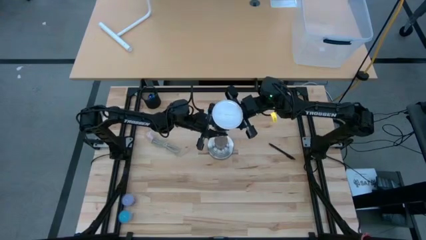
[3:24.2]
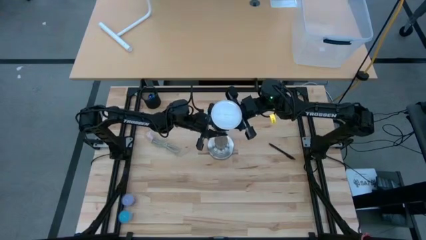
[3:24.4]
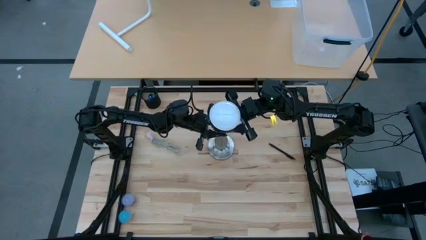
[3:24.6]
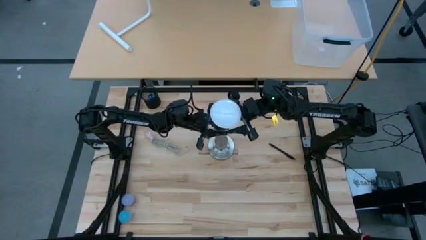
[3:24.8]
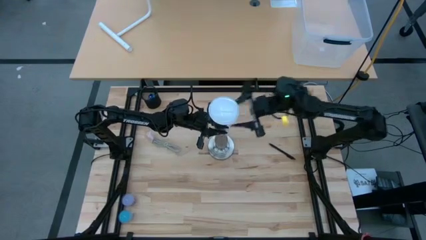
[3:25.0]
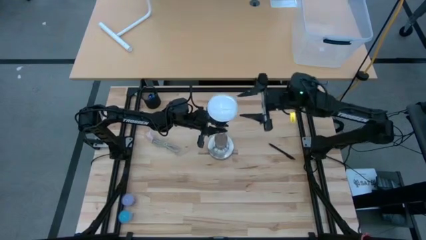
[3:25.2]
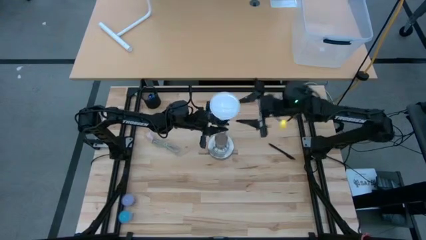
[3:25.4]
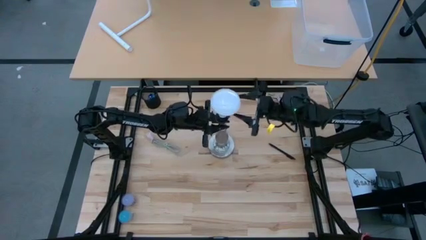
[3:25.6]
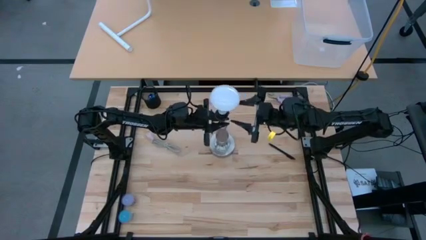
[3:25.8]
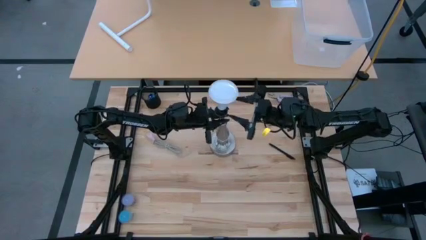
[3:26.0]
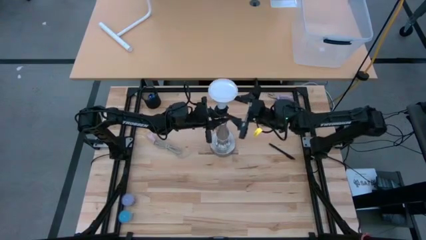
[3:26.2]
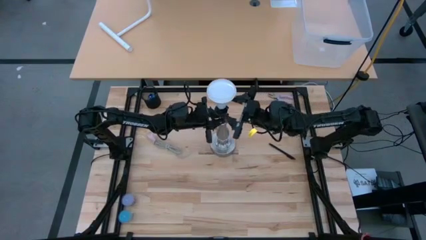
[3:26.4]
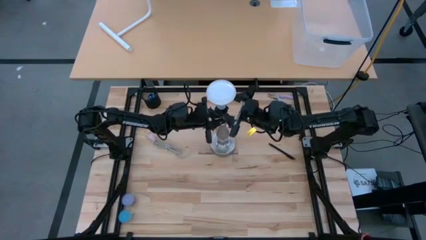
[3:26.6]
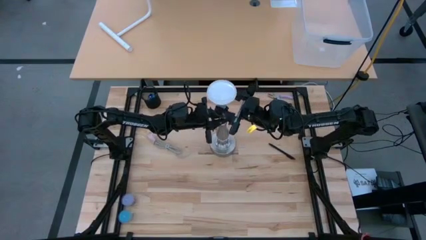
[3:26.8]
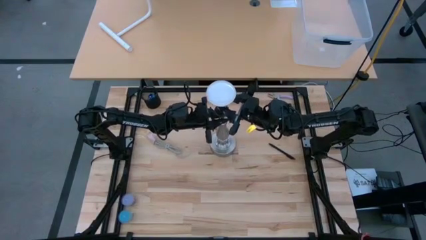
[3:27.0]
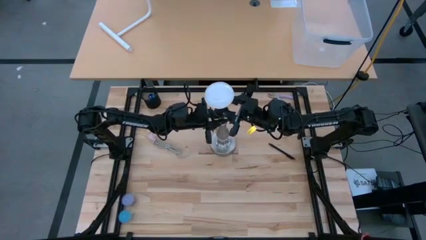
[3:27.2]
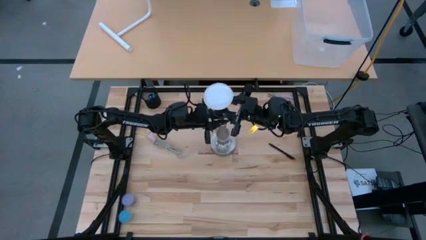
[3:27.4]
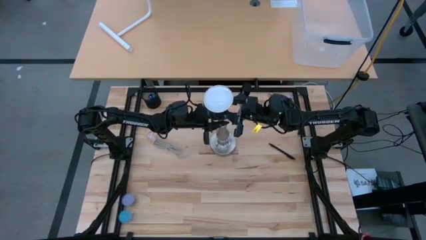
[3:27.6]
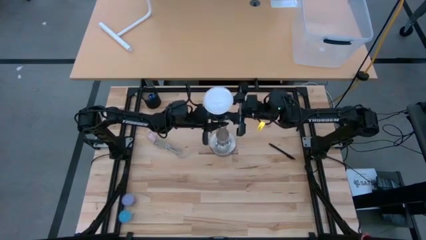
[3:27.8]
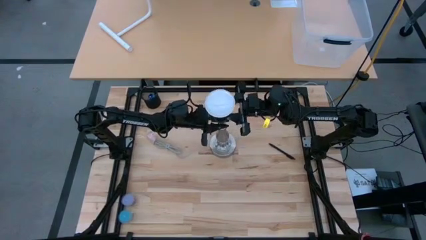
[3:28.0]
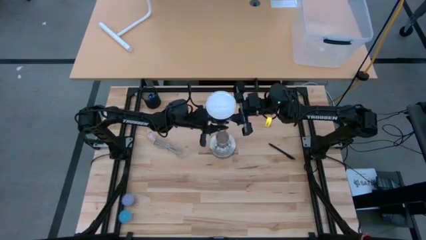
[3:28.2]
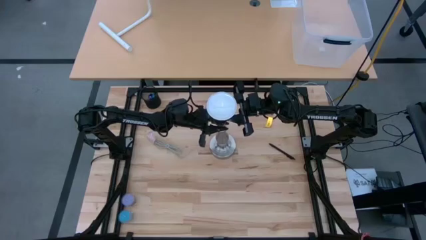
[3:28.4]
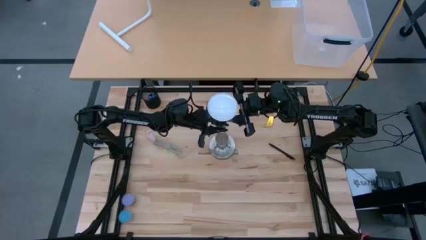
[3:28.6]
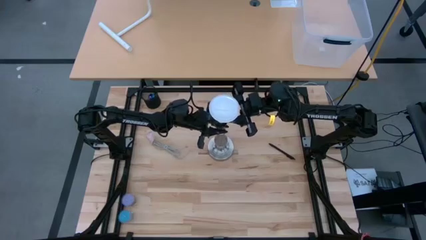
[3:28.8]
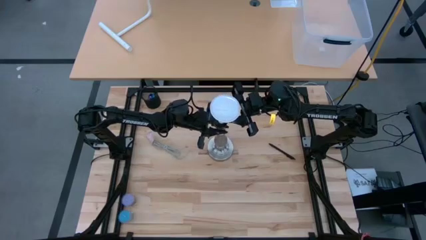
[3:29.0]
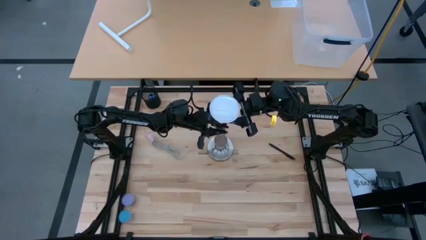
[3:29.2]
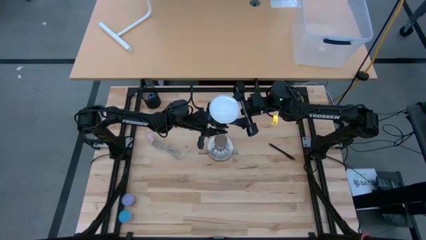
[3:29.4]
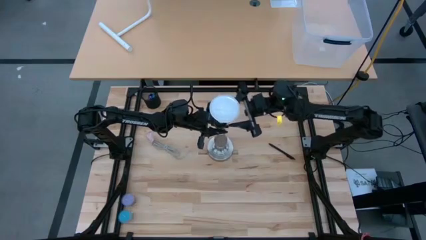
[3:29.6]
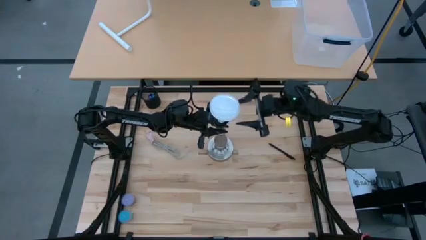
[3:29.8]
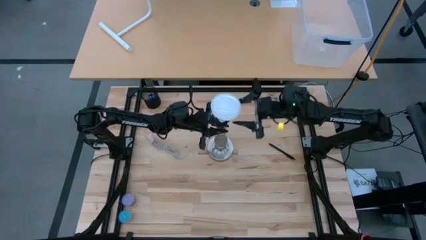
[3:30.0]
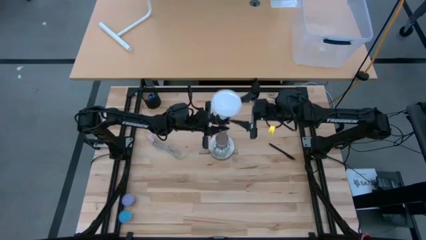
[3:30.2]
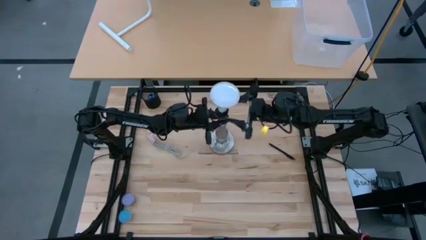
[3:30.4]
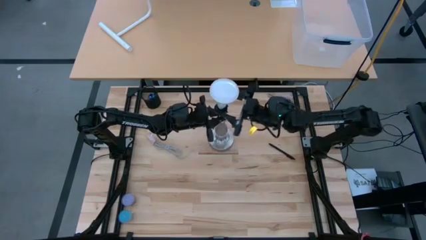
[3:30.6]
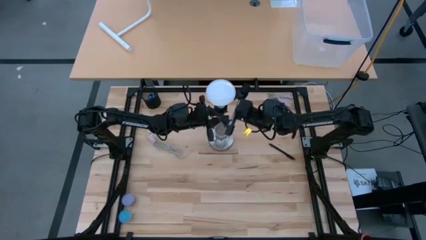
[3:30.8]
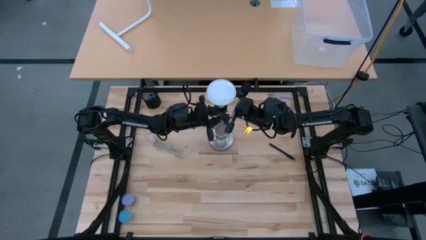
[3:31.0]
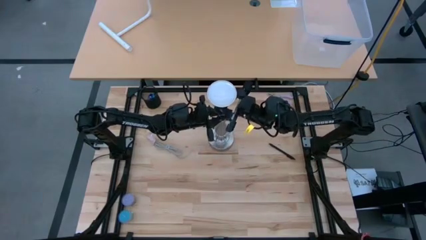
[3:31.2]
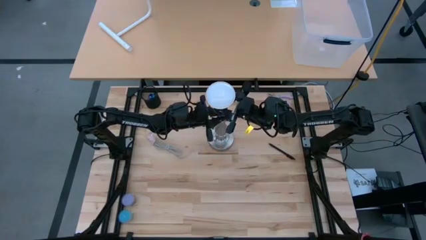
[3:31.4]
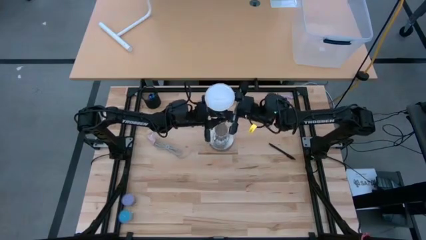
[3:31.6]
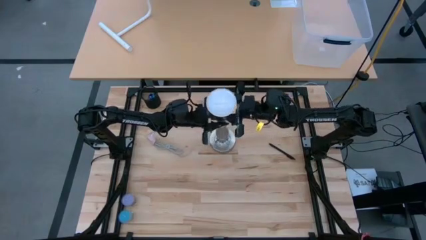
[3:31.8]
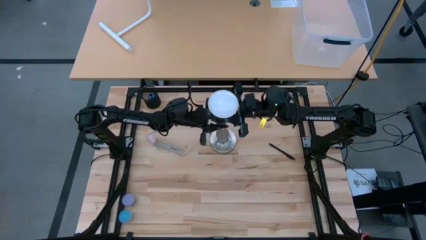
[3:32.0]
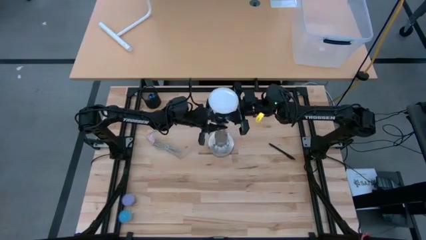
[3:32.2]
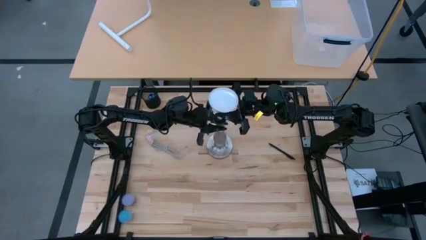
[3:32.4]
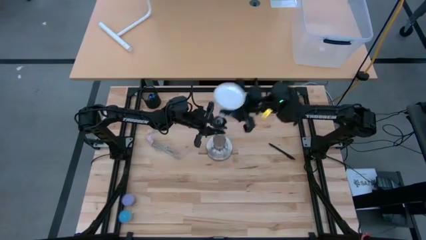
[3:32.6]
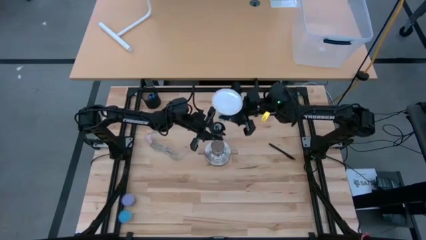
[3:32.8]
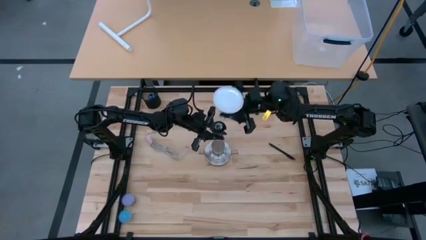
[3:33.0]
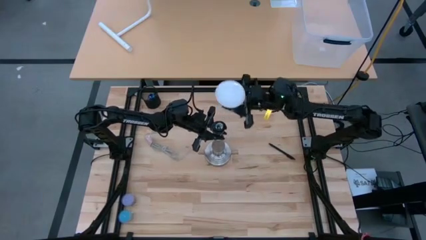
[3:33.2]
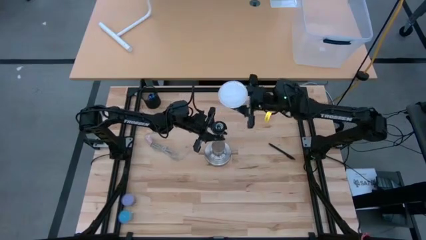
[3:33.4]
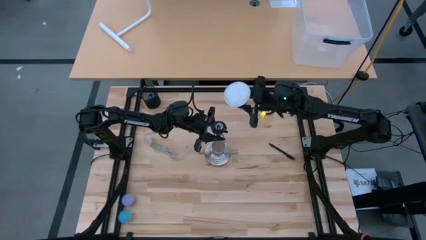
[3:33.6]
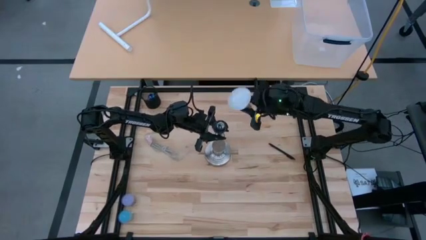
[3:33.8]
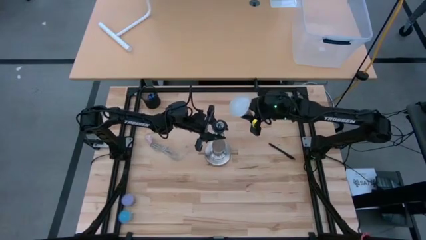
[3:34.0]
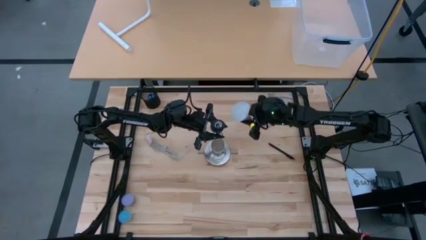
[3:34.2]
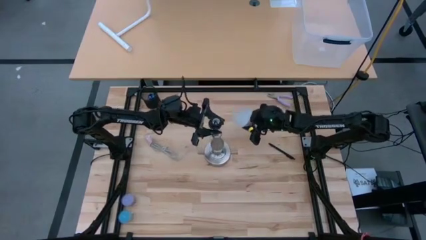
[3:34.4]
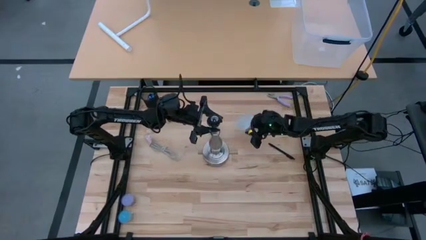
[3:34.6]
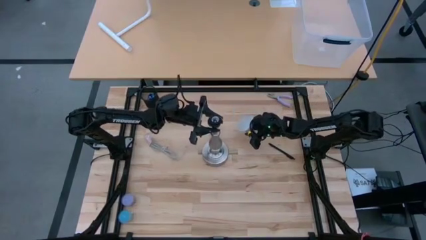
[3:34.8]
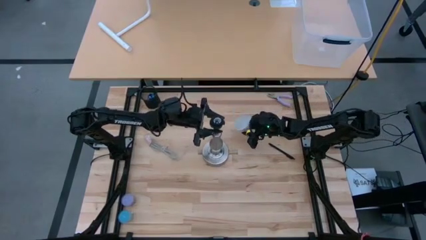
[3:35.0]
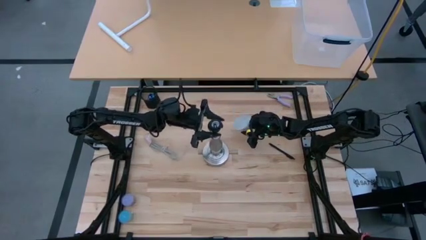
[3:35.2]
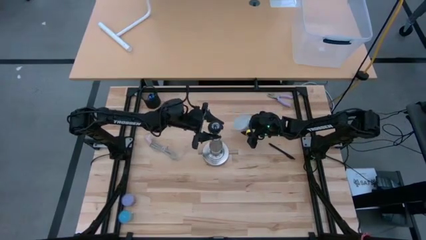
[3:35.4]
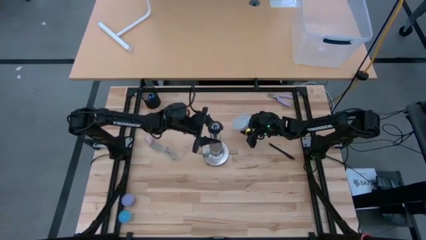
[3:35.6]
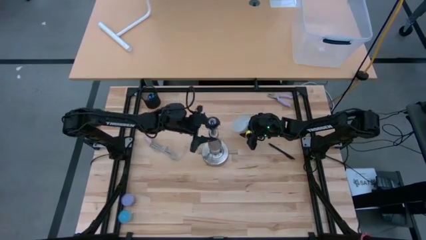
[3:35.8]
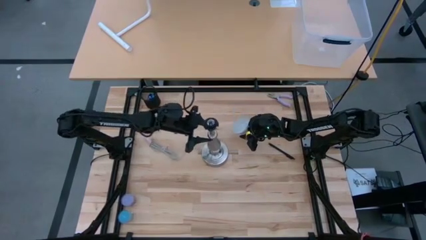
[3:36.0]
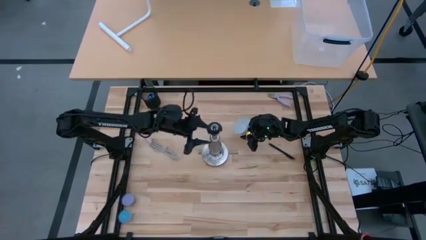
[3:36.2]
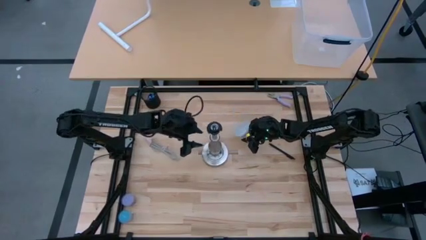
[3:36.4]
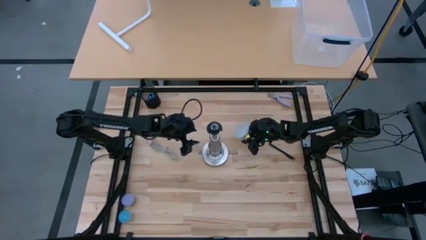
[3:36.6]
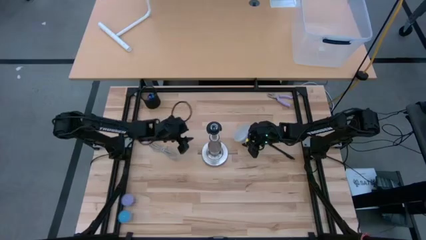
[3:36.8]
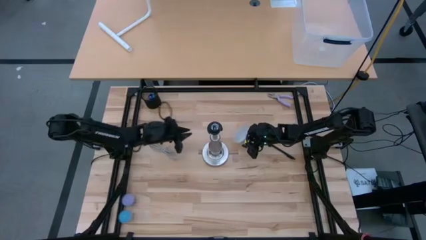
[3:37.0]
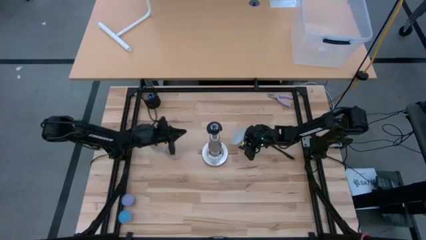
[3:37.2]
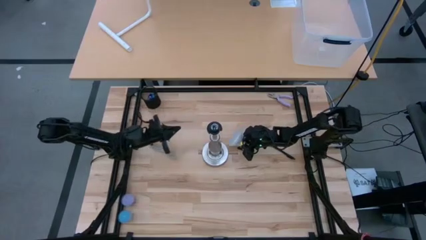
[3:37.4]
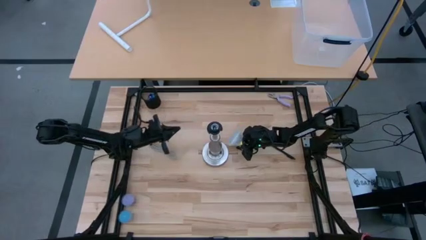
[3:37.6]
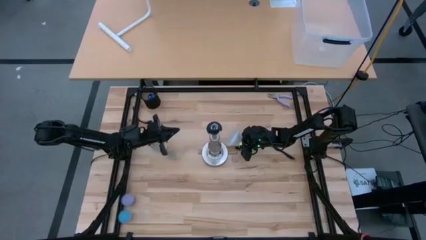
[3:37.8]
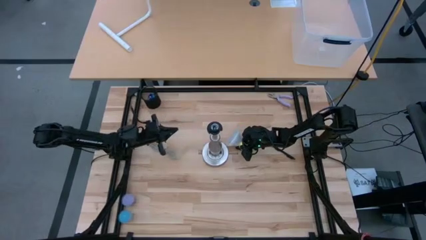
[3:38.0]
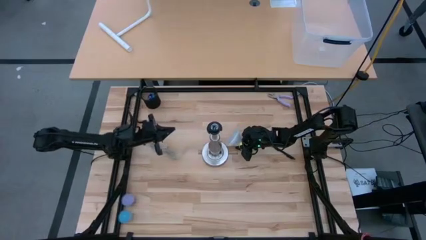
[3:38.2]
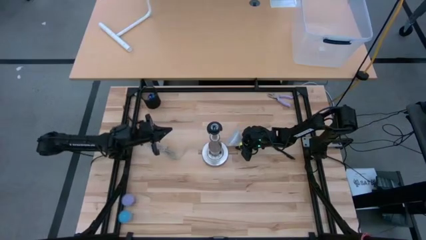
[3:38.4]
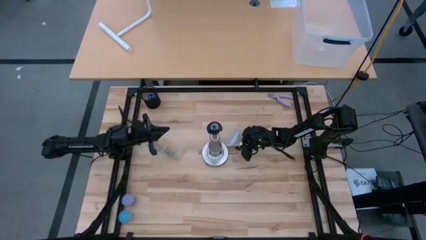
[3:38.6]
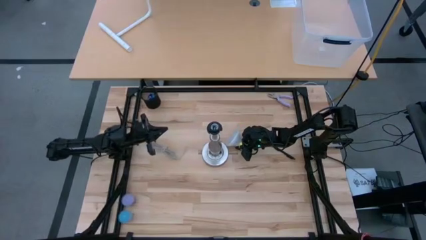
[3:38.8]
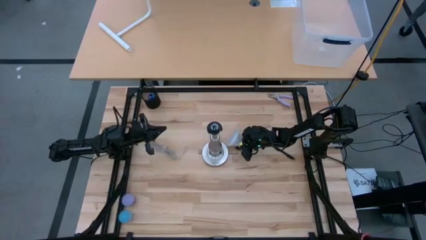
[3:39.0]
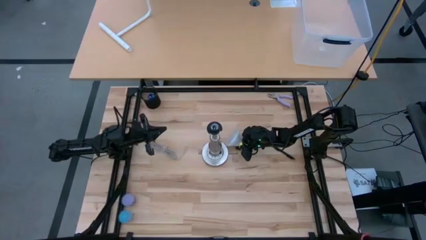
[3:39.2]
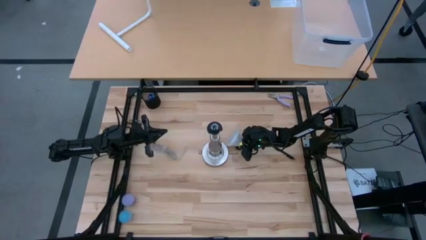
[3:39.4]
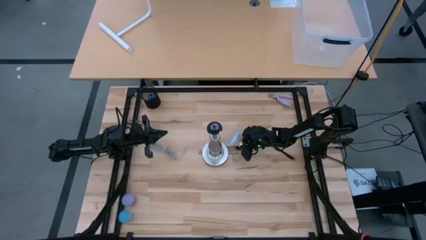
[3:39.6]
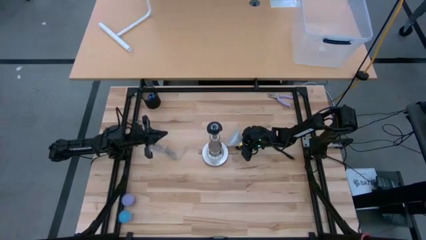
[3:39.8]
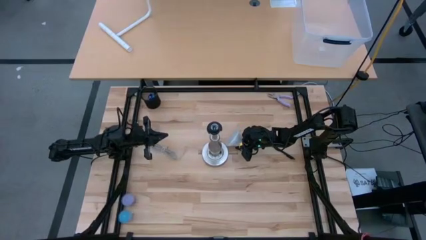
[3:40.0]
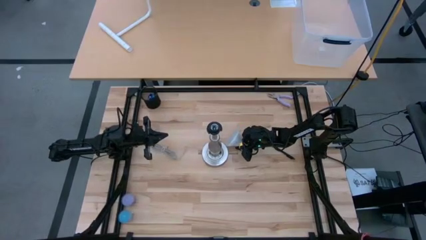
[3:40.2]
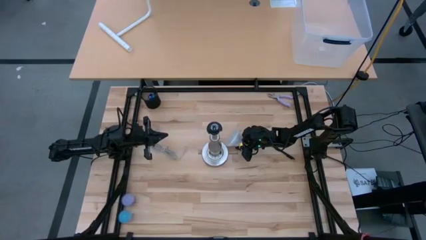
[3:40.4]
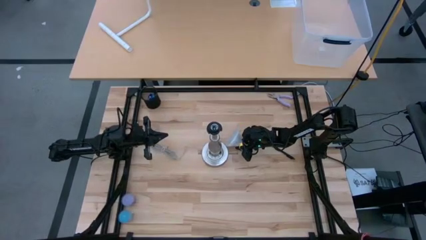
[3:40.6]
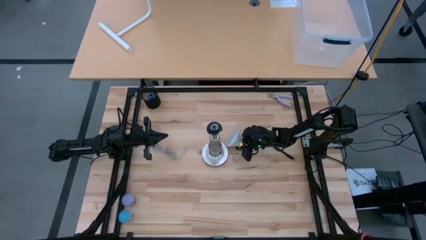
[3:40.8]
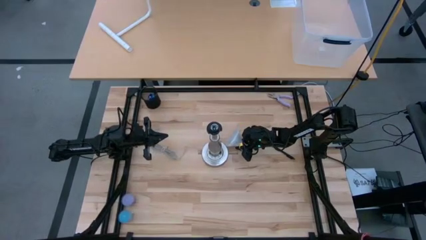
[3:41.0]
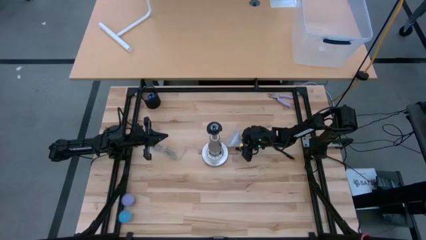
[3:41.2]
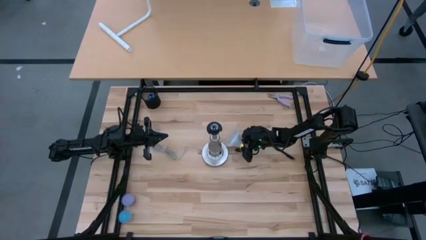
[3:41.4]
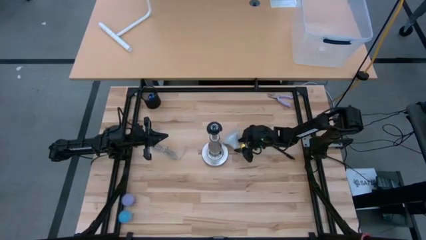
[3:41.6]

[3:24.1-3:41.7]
Task: Screw lightbulb
Remove the lightbulb from the lamp
